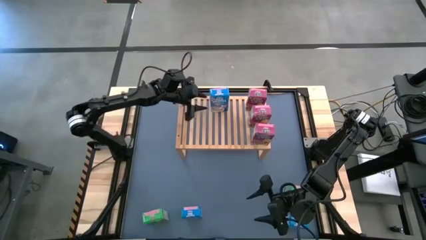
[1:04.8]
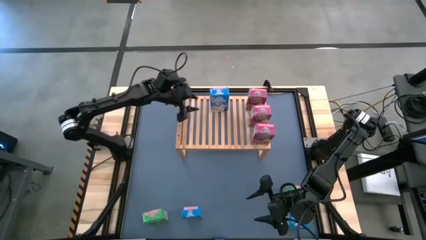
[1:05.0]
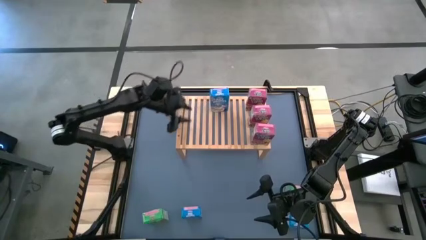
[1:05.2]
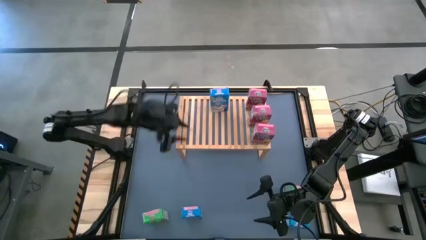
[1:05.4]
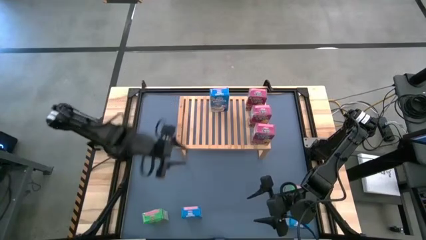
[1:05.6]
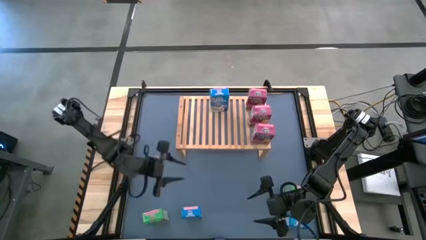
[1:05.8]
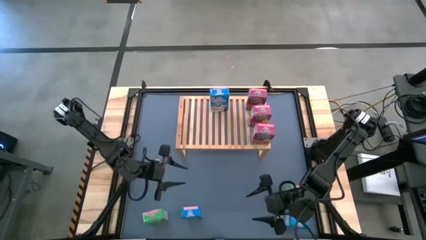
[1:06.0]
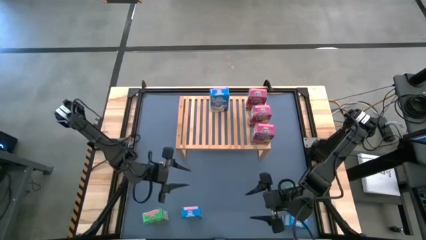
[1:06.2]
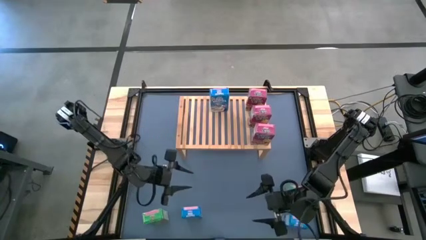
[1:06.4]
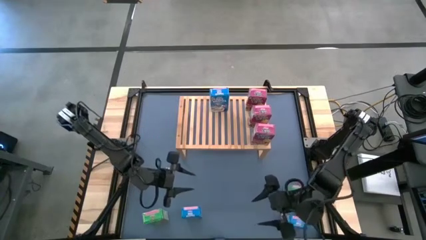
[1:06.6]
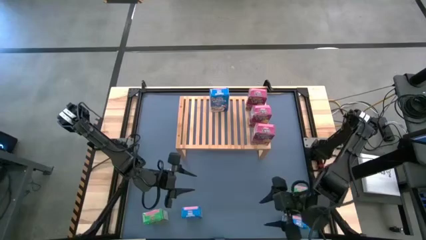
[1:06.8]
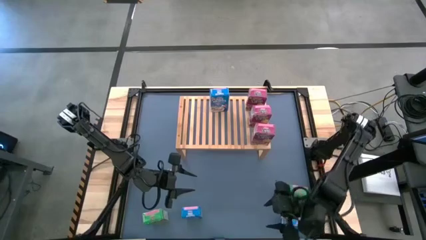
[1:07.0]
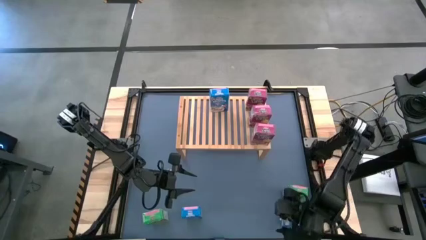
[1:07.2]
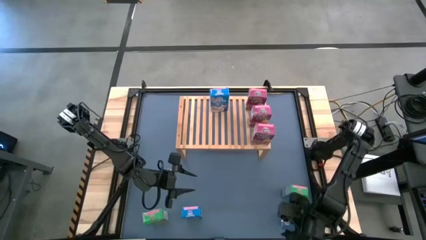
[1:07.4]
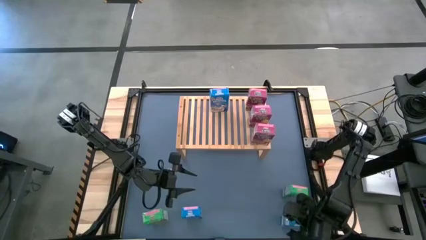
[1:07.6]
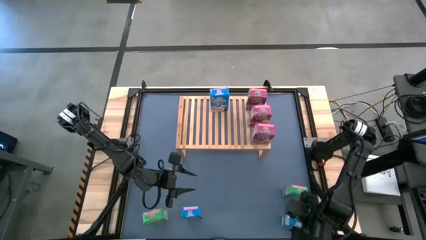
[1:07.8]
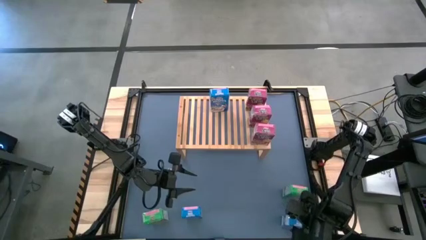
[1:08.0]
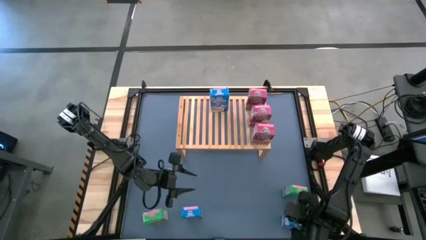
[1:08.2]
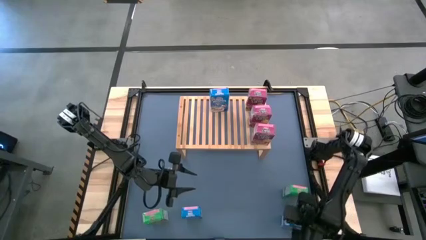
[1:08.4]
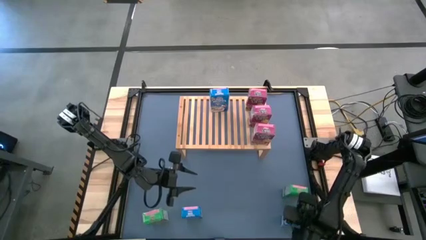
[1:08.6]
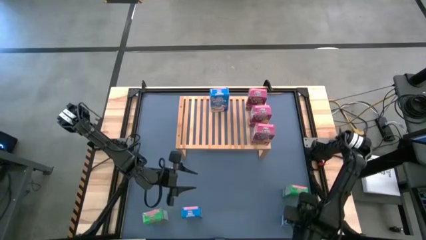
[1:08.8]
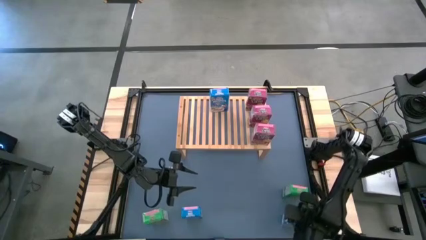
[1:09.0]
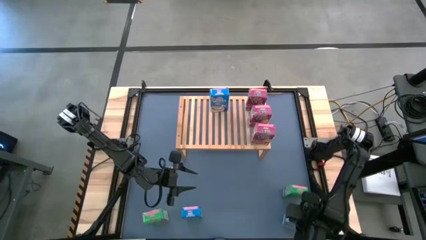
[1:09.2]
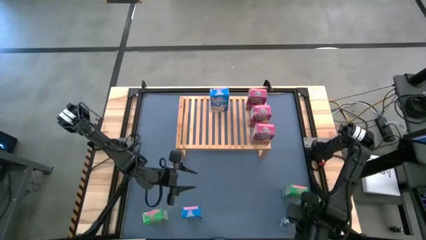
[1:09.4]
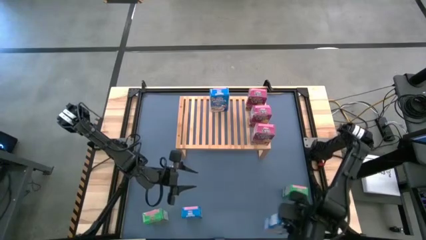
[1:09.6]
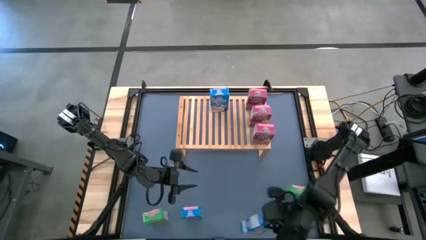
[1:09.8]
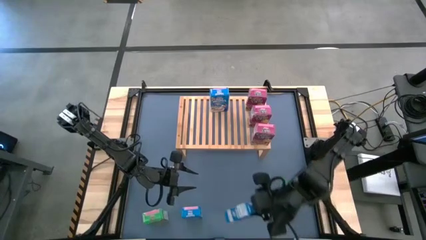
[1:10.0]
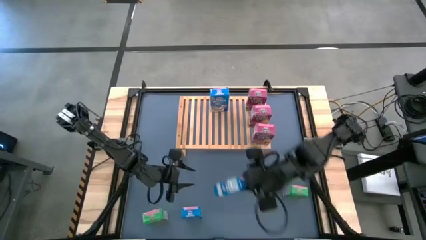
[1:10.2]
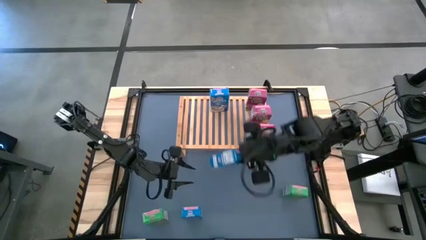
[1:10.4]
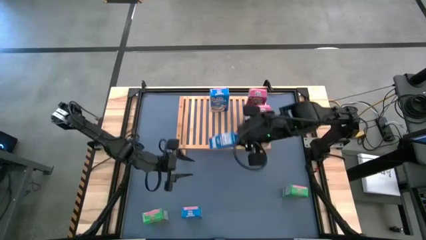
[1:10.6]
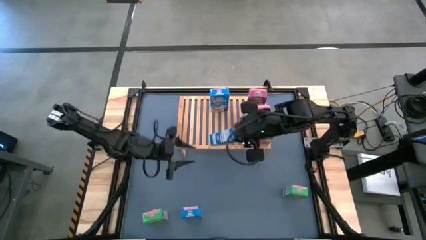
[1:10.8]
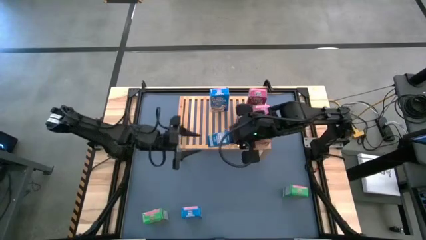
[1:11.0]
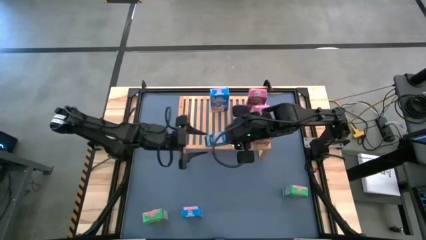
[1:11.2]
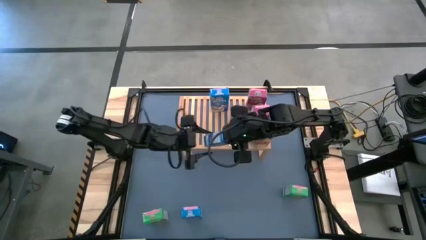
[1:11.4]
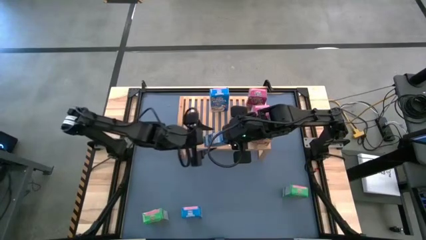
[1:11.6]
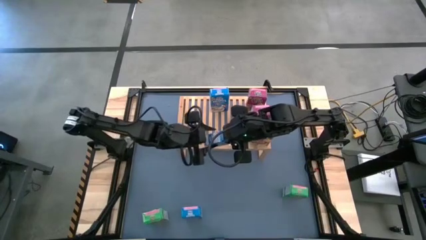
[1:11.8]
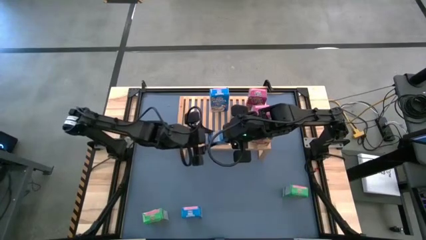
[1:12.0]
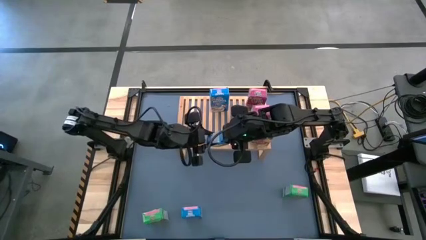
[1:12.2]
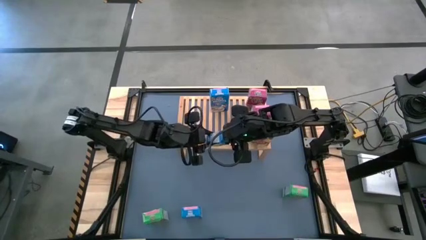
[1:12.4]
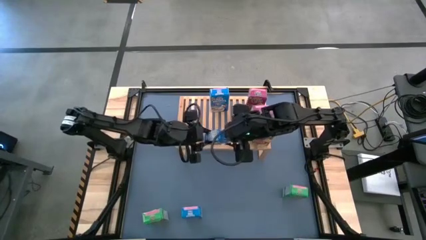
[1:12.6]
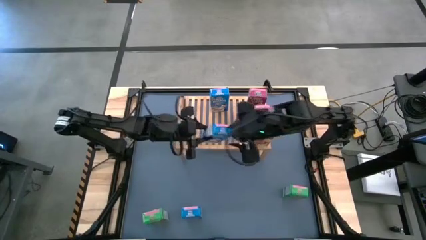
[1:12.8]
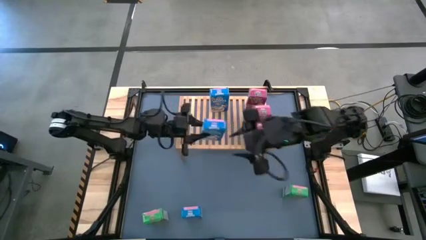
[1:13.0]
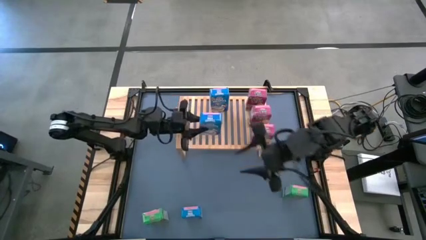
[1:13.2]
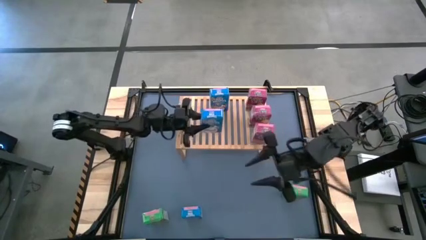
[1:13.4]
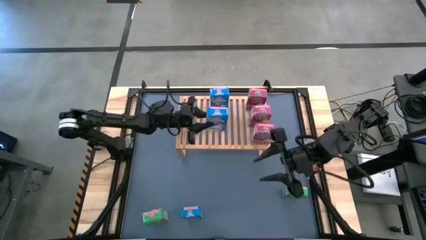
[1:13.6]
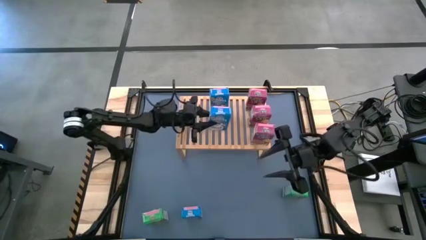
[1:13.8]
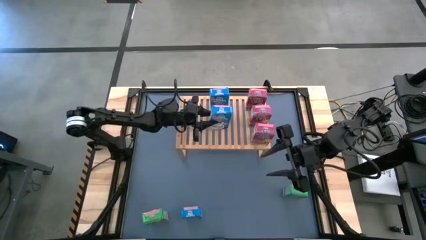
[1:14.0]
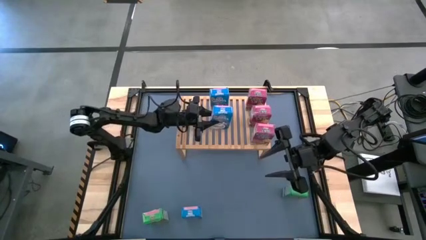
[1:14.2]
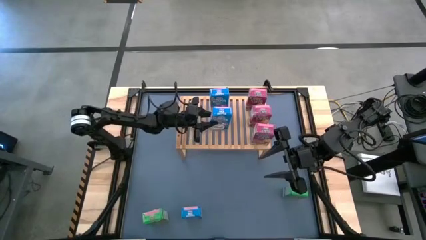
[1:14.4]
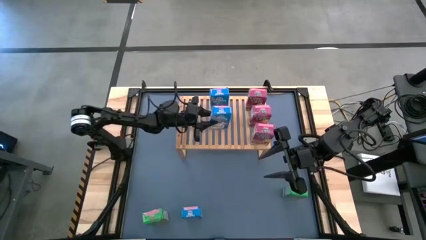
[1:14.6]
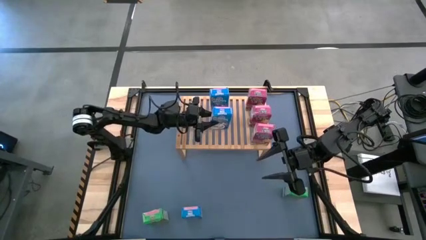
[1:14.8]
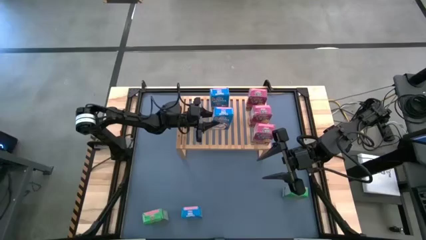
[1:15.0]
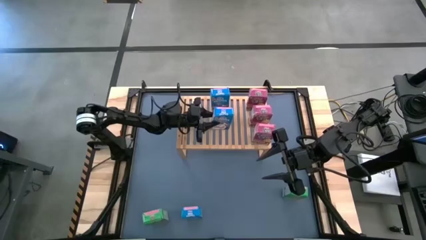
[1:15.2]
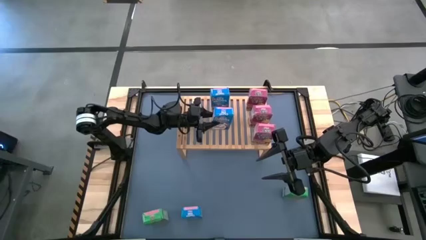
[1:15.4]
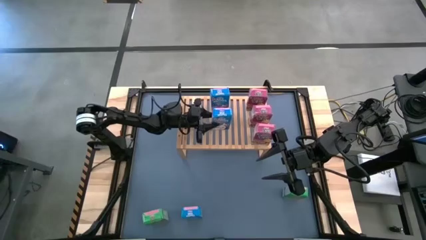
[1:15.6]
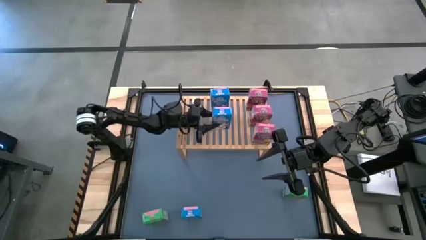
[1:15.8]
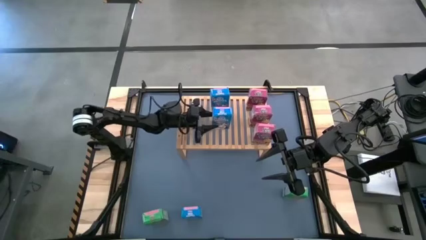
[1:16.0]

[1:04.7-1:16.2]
Task: Stack cereal on shelf
Put the right blue cereal box on the shelf

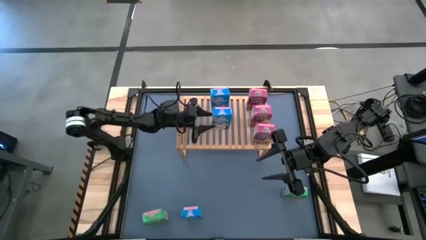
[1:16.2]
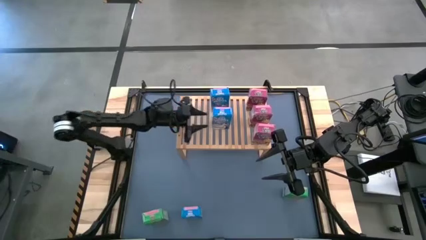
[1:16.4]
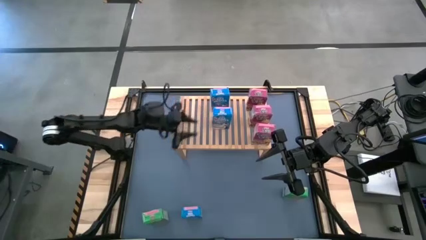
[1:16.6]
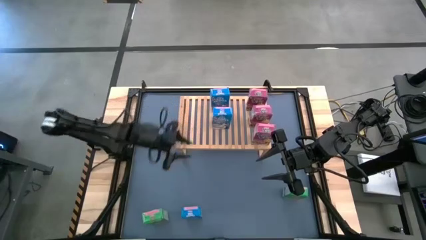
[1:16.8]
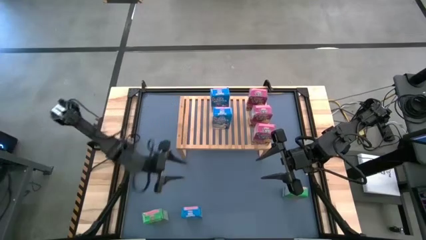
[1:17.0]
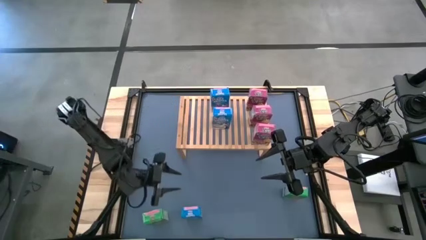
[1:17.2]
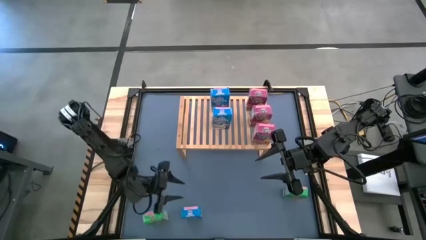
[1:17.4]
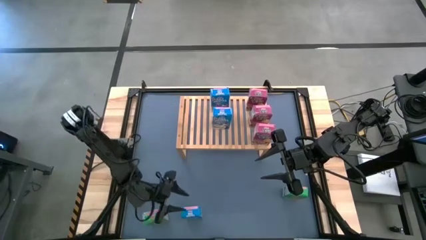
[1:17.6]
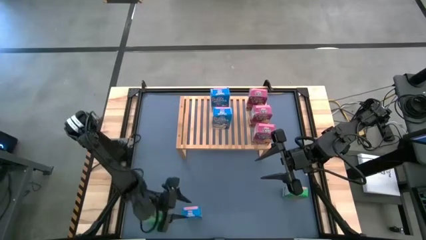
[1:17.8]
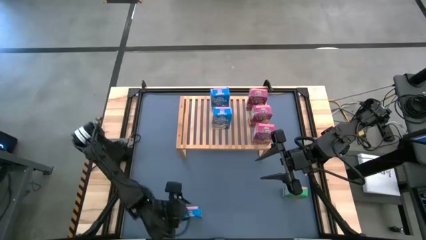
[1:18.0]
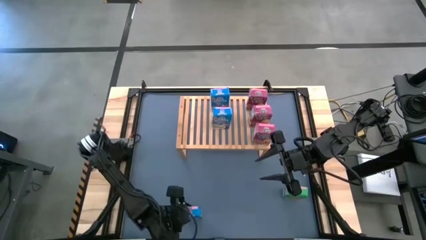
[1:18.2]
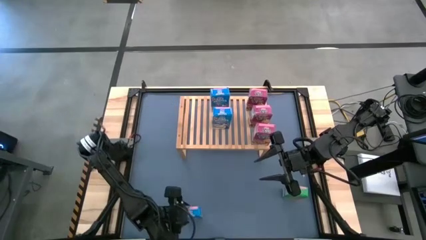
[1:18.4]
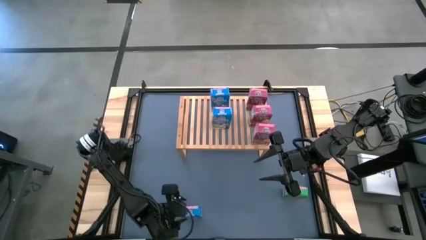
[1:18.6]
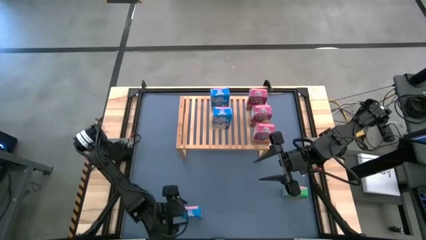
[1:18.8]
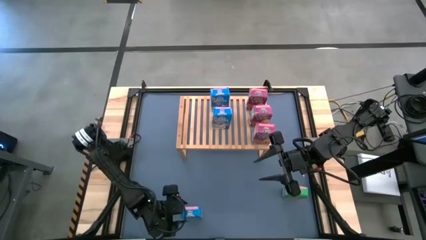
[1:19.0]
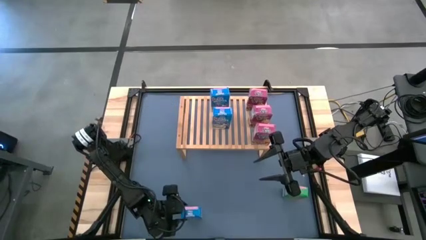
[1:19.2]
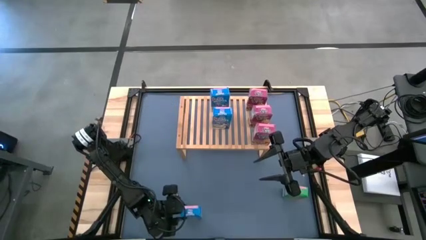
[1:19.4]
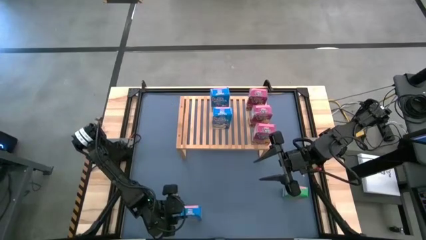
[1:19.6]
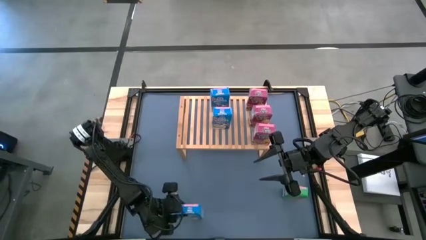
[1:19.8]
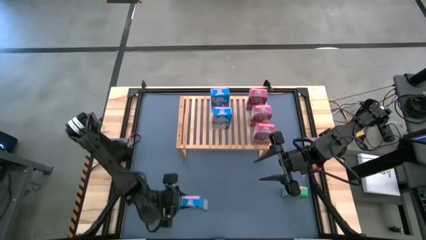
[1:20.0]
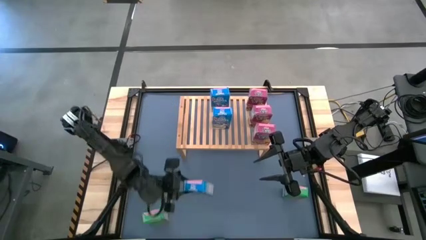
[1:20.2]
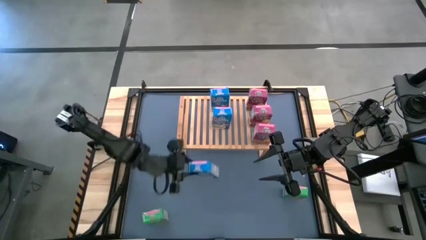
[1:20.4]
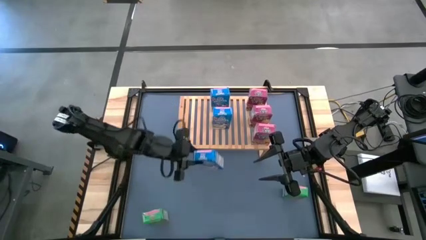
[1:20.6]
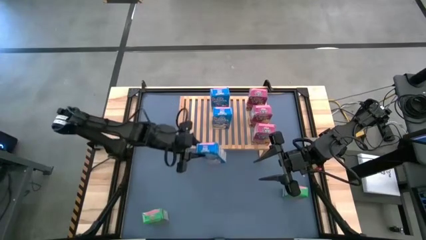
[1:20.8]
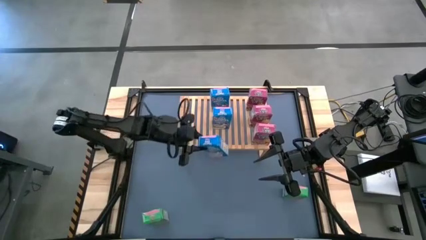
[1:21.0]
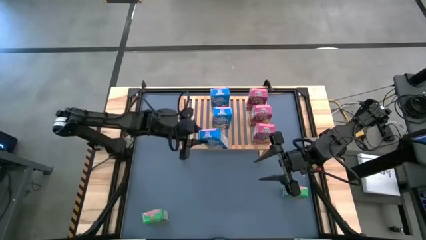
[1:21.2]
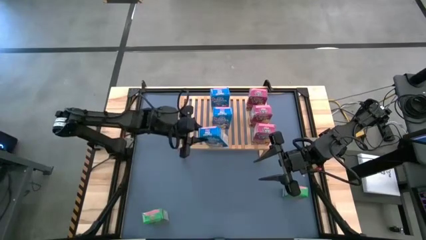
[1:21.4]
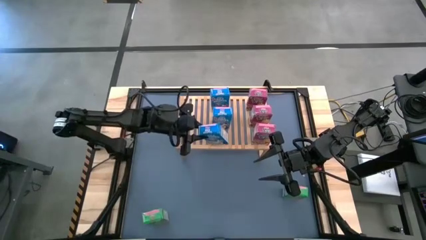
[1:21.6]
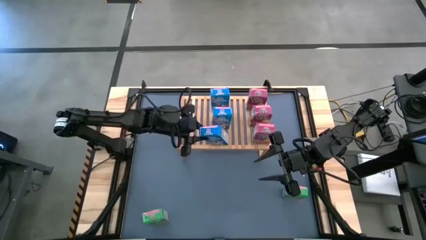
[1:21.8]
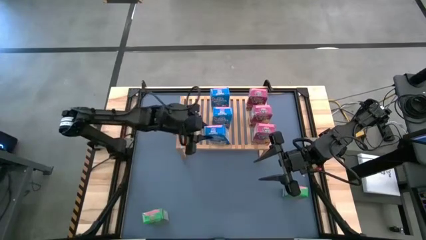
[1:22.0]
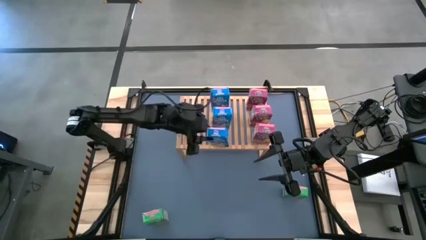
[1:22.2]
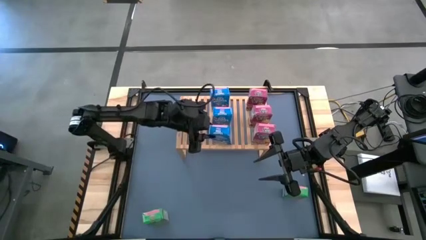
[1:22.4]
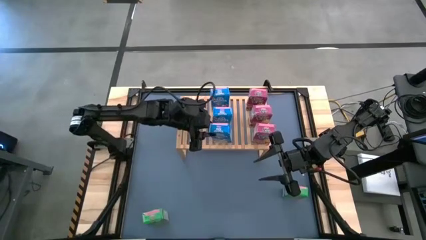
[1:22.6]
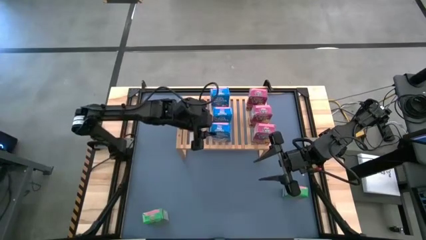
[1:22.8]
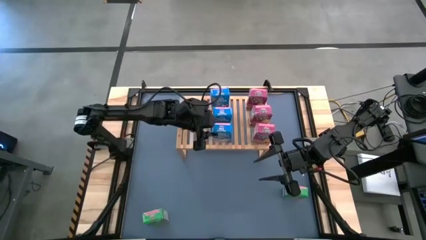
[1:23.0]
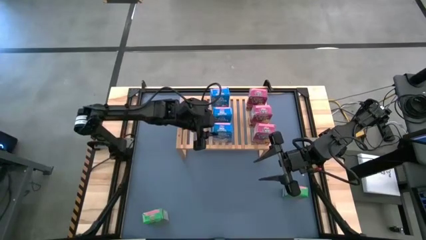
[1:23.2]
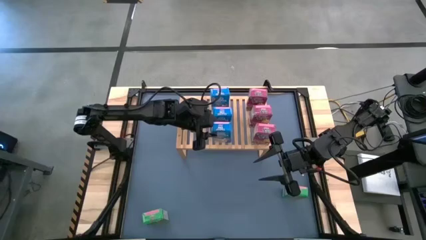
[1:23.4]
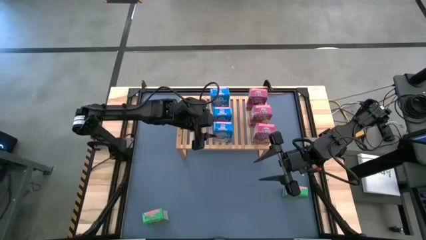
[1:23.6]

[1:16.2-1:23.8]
Put the blue cereal box on the shelf
